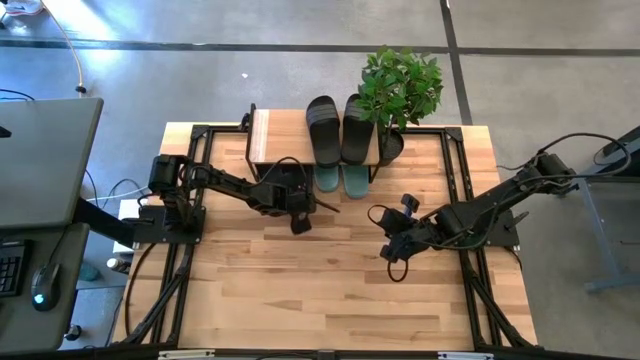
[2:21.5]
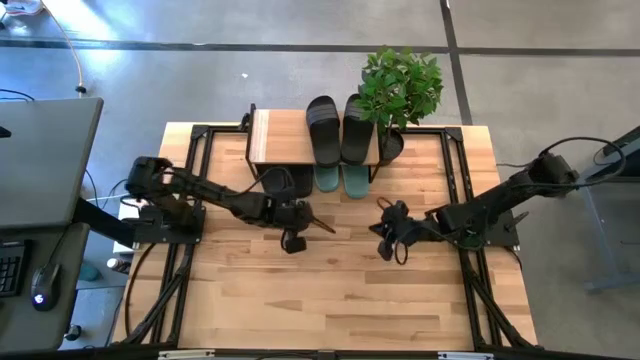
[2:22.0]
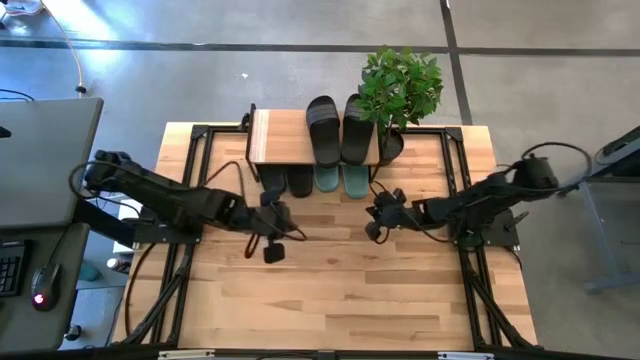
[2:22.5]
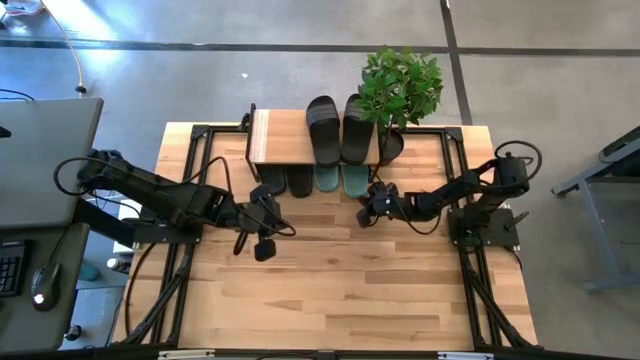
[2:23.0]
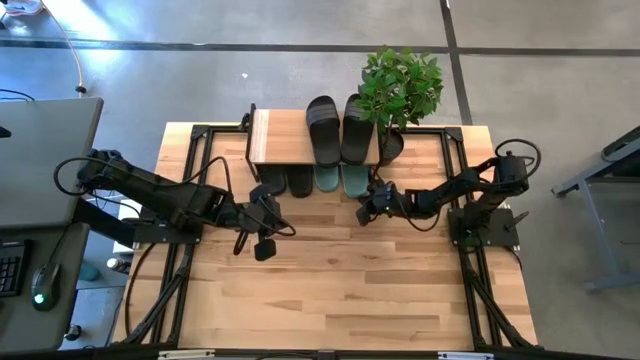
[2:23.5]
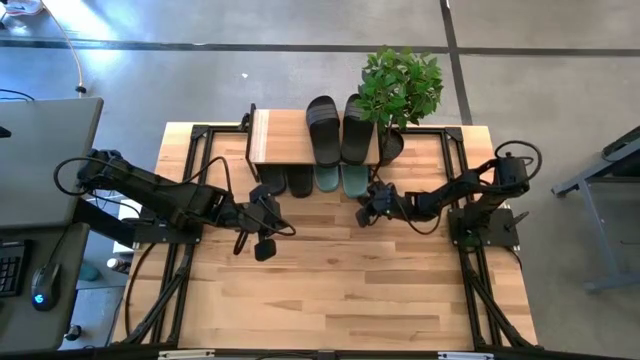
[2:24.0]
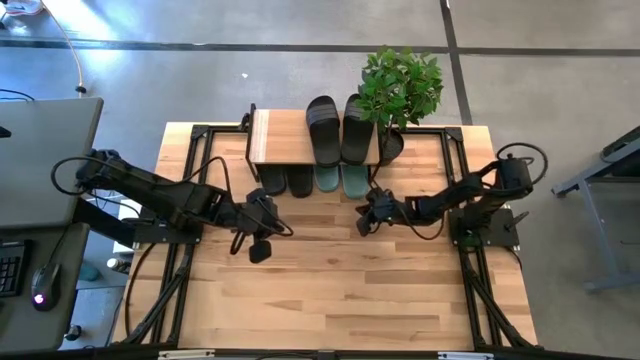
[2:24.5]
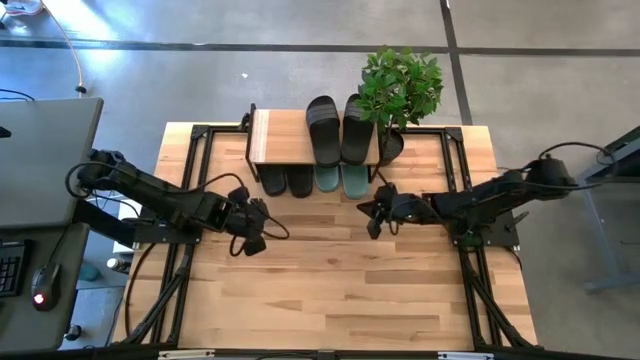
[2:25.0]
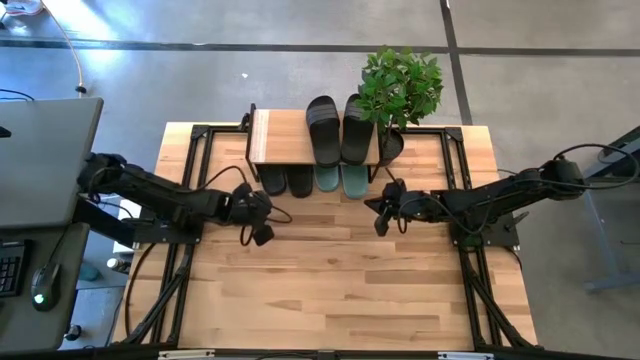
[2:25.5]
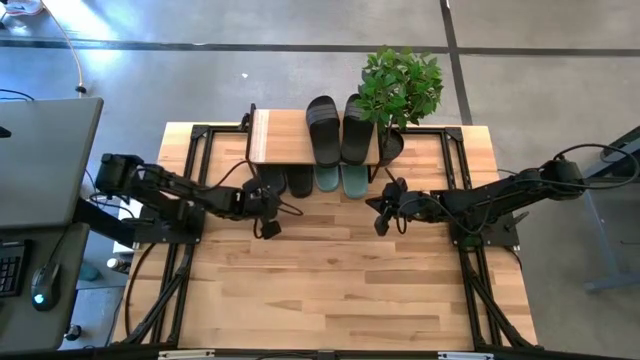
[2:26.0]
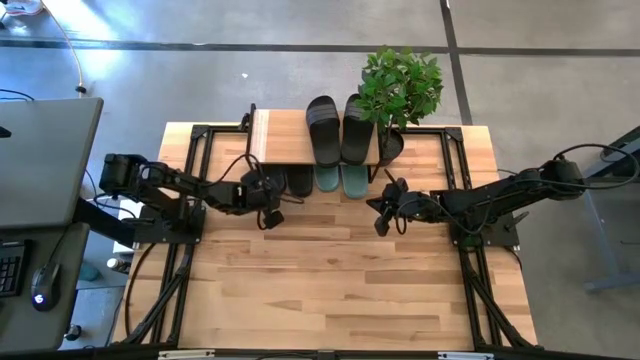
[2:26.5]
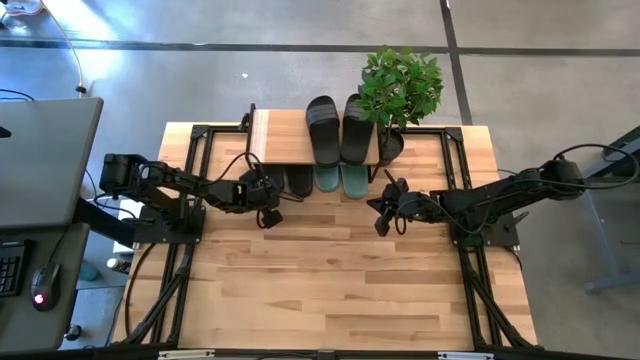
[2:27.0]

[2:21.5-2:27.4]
Task: Pick and place slides into the shelf
Adjust the slippers under the shelf

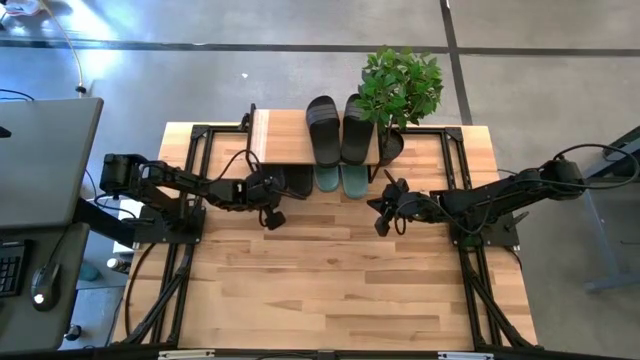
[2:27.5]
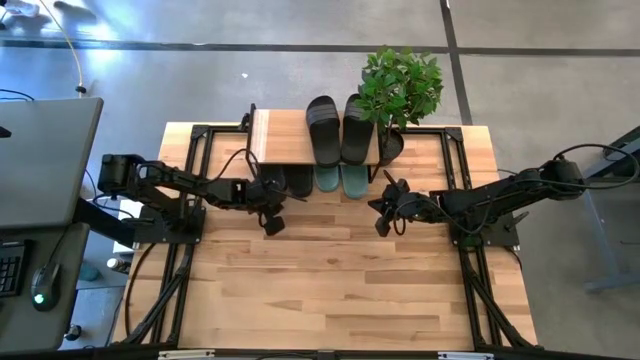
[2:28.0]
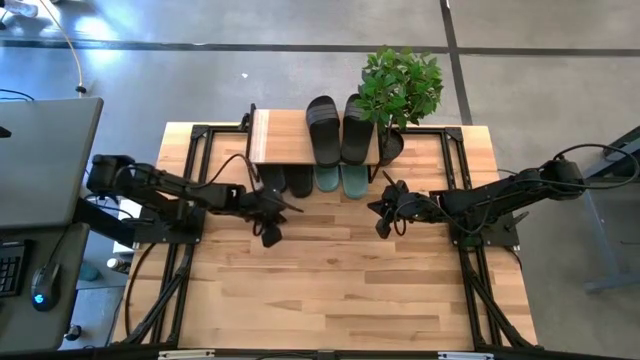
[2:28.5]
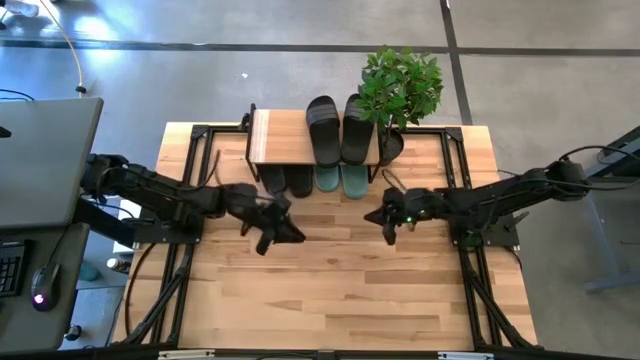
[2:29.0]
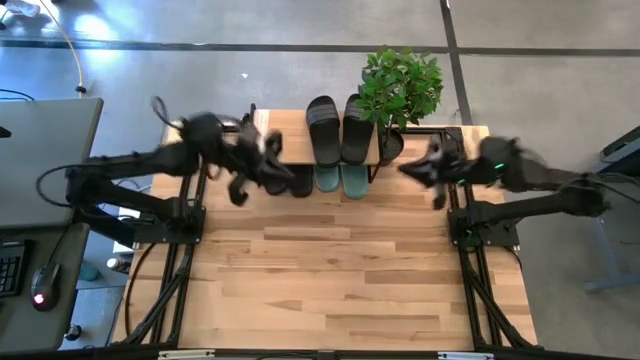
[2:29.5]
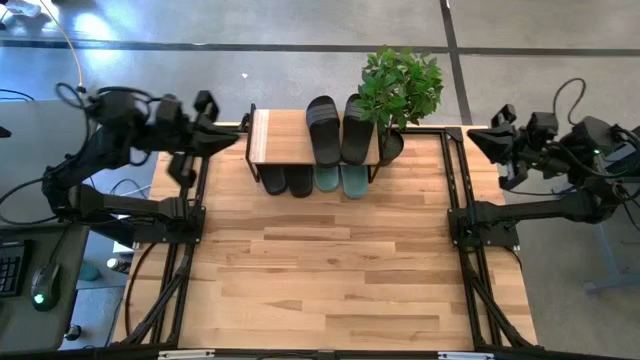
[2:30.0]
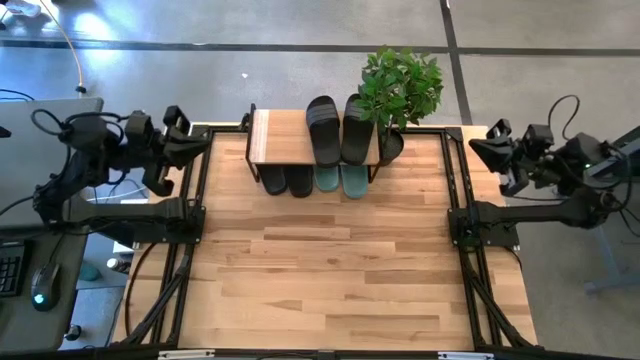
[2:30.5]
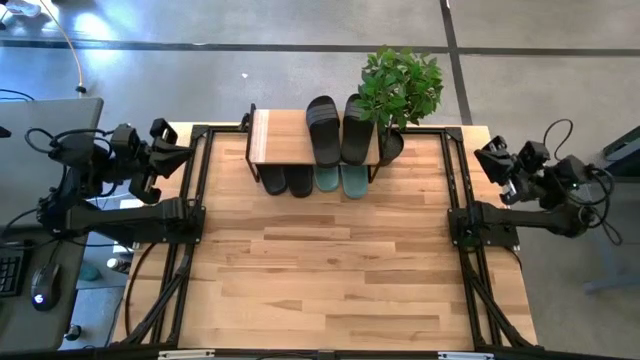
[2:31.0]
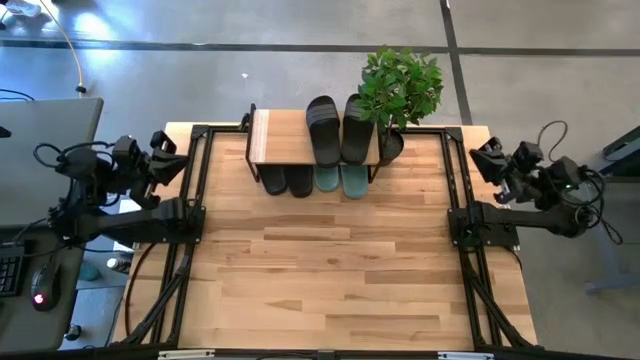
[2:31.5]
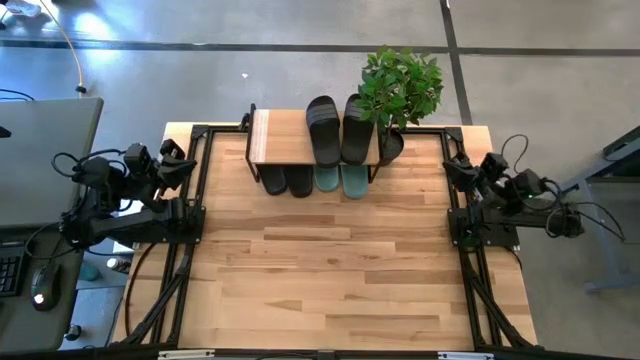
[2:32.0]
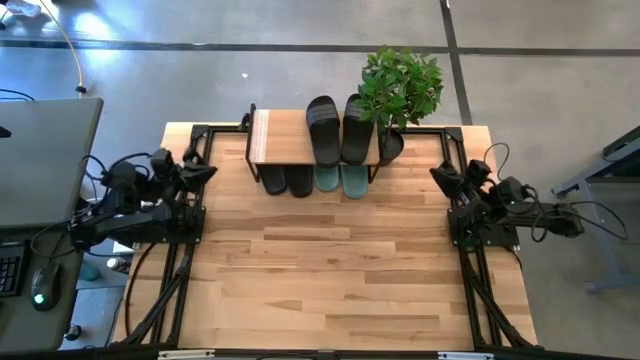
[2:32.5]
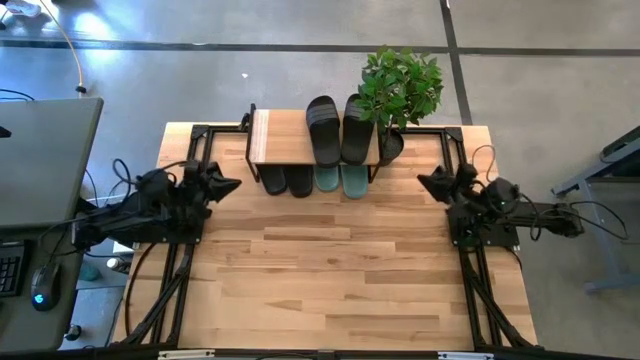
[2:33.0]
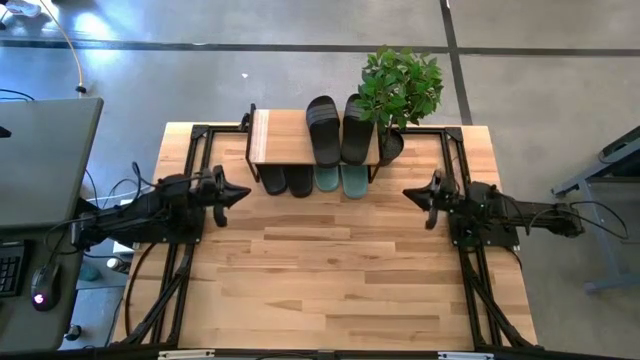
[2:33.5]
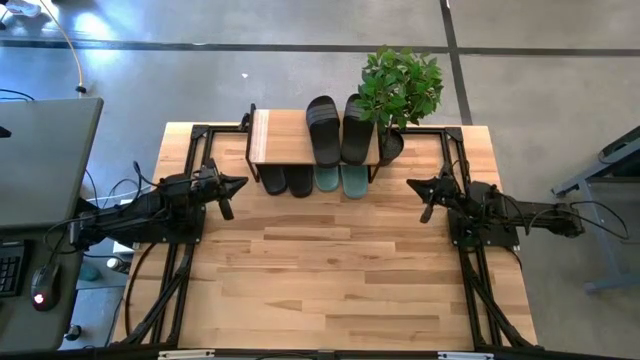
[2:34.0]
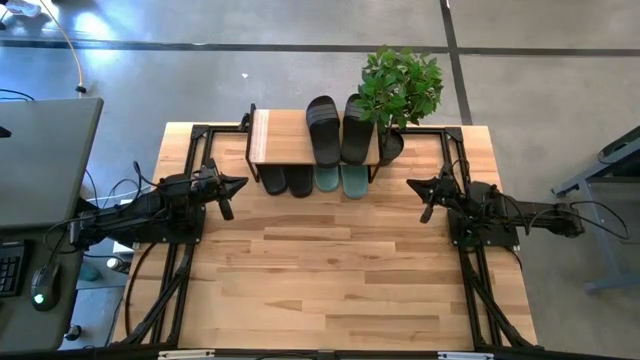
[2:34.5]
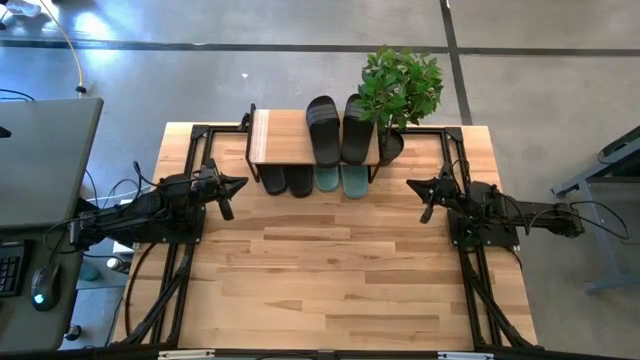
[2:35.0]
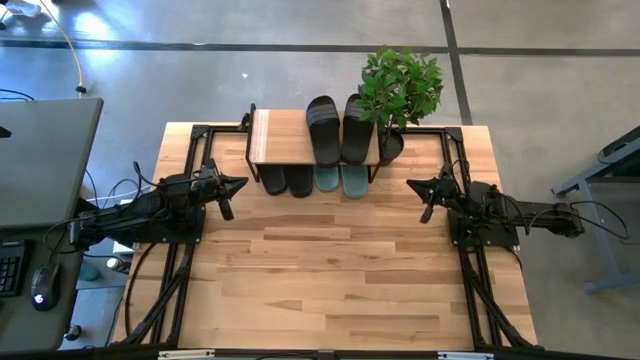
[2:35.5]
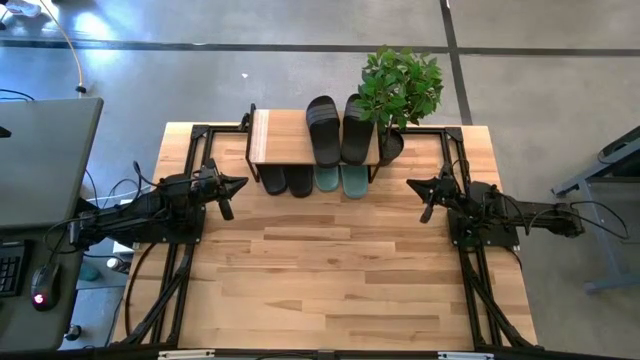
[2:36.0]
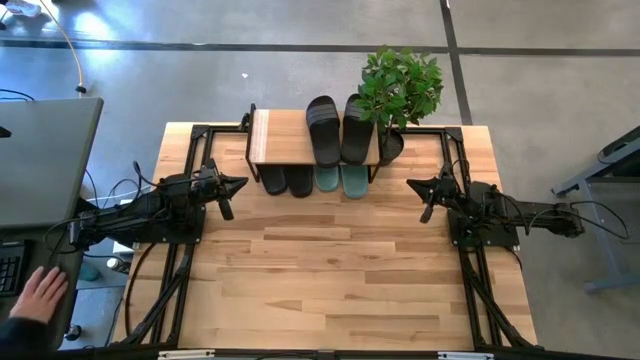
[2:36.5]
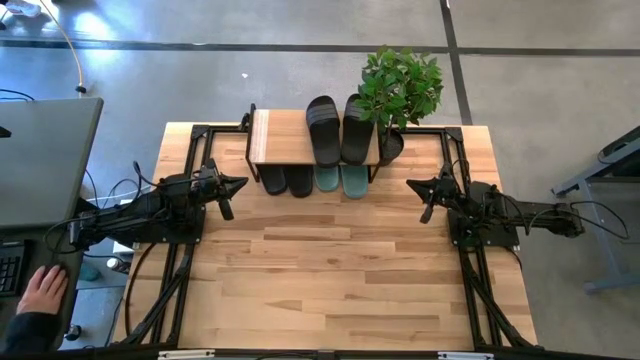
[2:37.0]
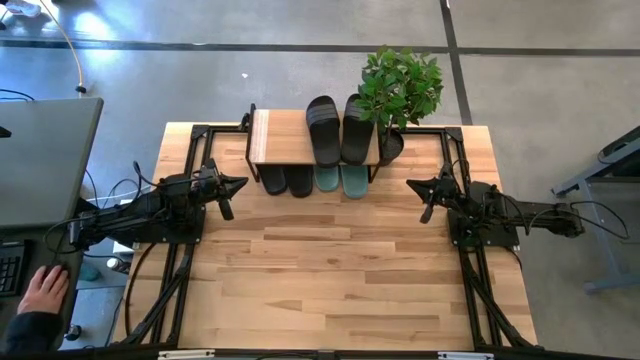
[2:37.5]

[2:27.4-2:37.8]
Return to Home Position

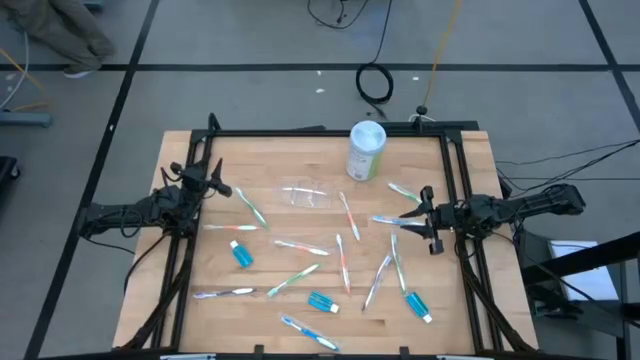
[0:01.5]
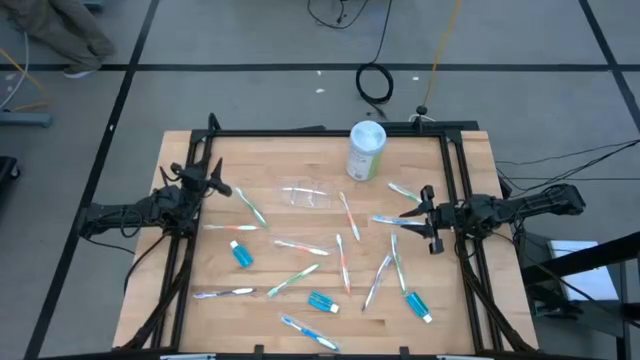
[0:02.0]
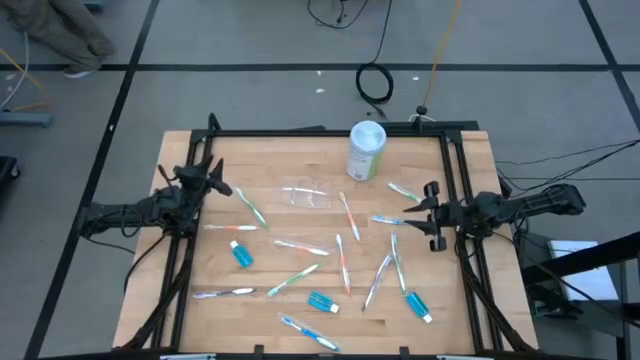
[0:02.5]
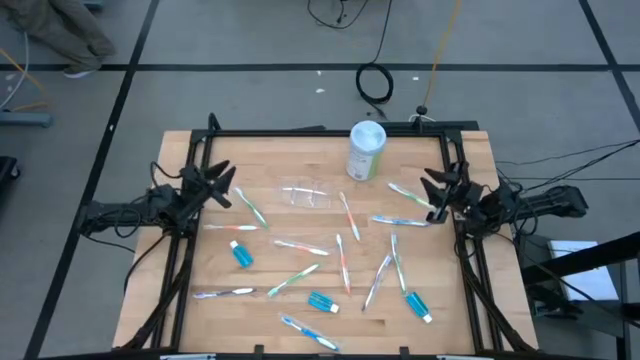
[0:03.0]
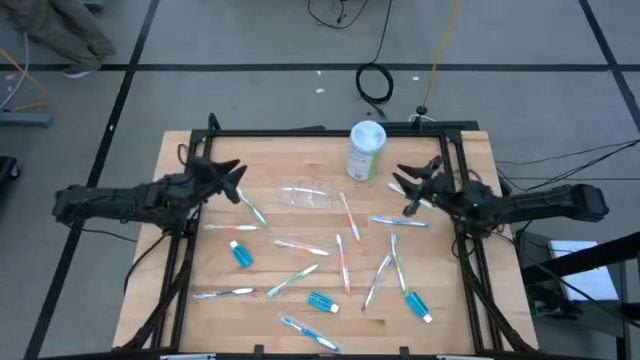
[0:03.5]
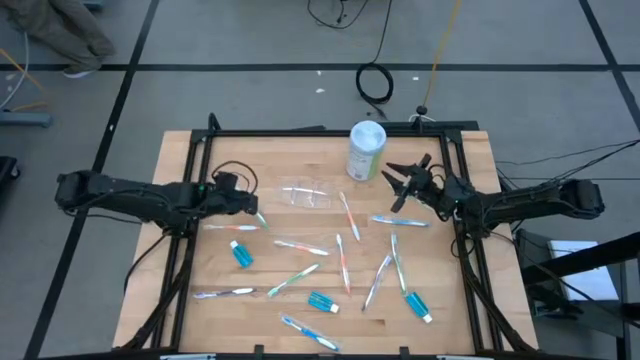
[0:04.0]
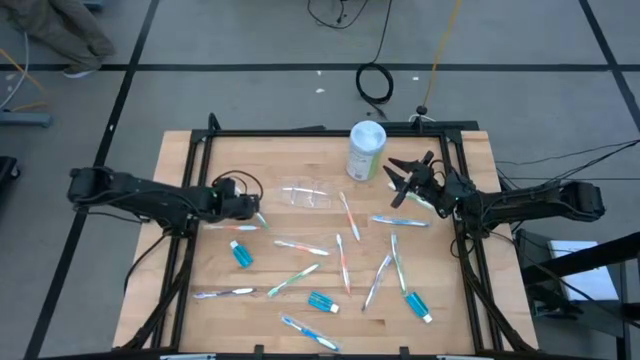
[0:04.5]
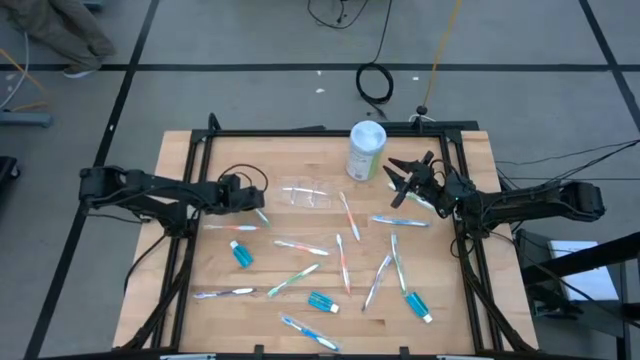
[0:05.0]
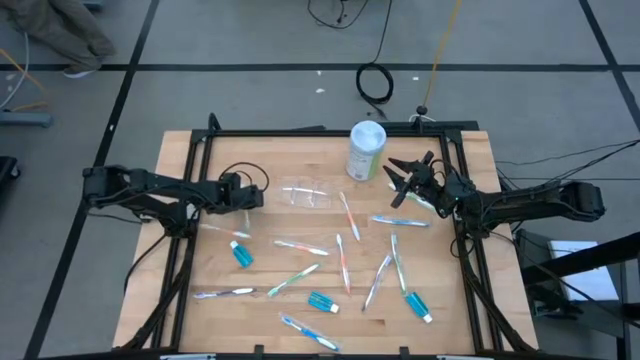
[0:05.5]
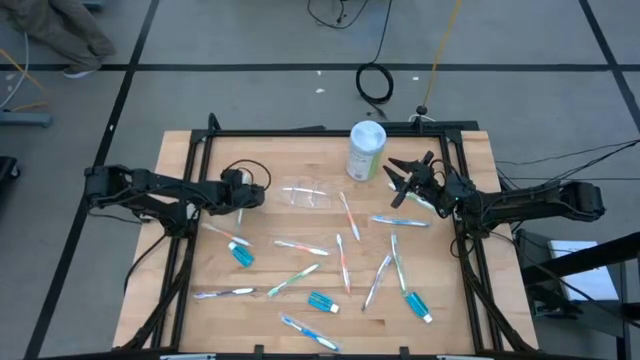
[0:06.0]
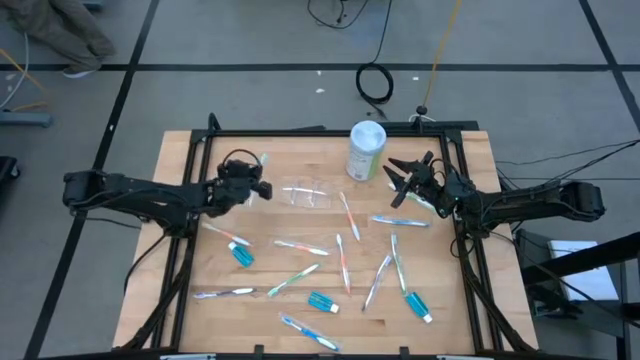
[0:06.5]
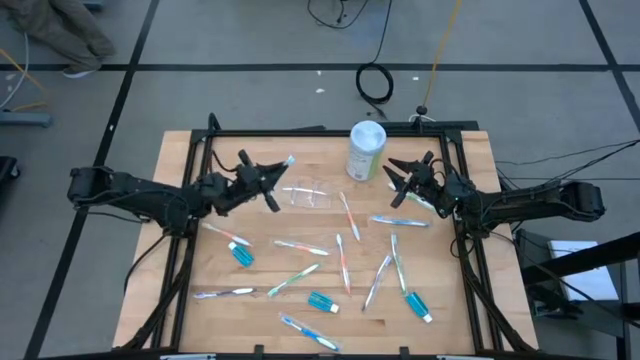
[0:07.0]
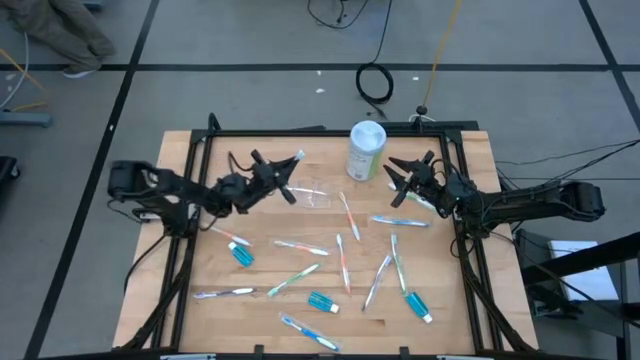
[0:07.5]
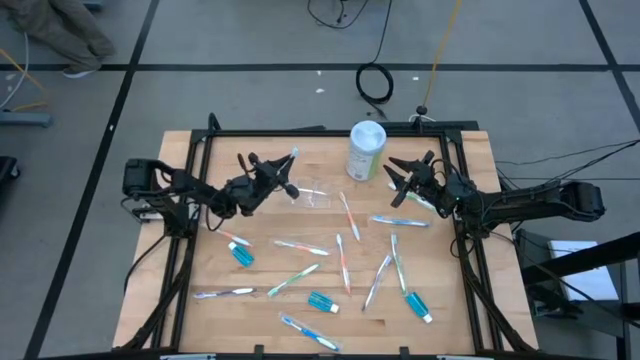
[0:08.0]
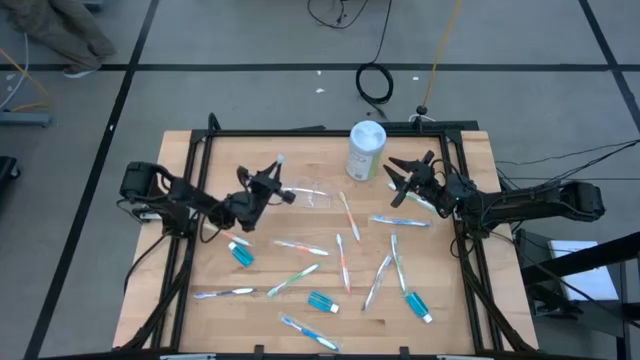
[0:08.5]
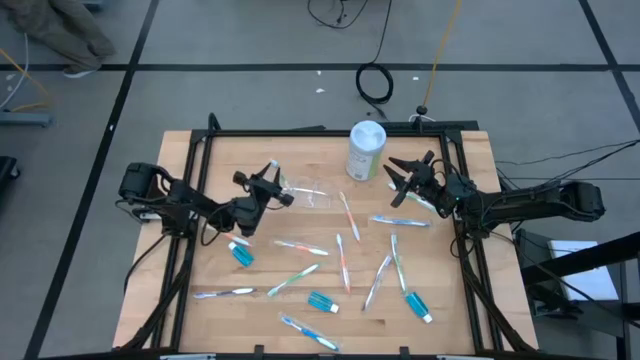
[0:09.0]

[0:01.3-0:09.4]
Task: Pick & Place toothbrushing station
Put the green toothbrush into the transparent organizer
